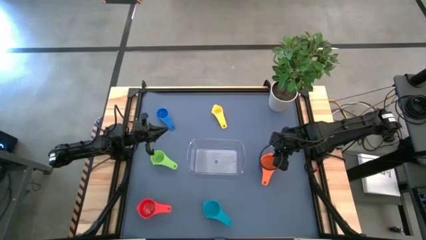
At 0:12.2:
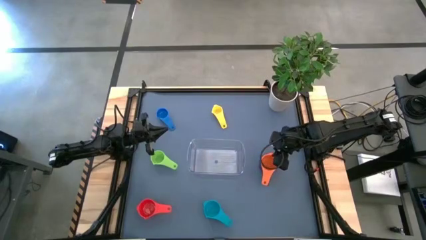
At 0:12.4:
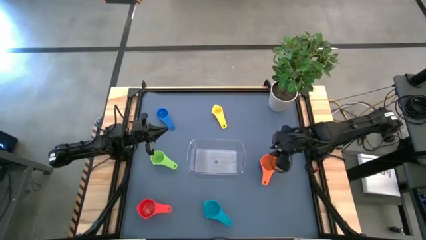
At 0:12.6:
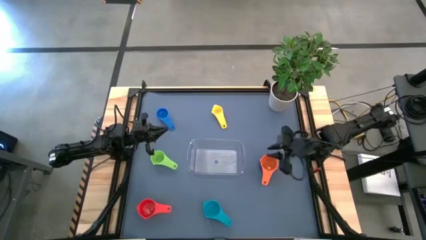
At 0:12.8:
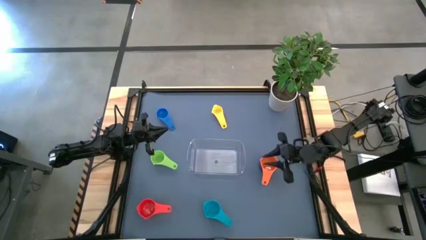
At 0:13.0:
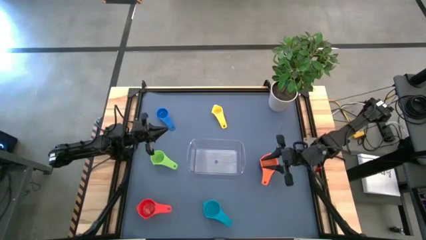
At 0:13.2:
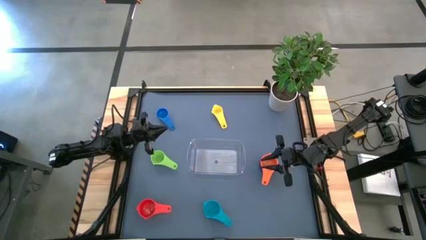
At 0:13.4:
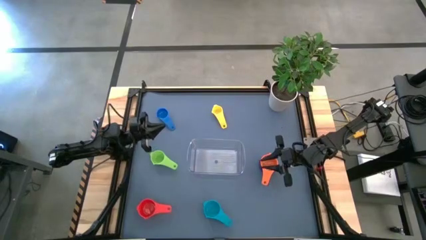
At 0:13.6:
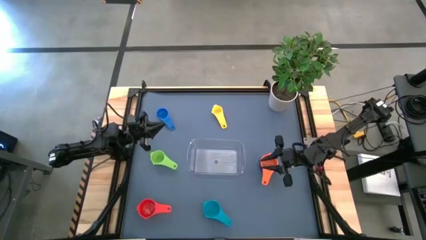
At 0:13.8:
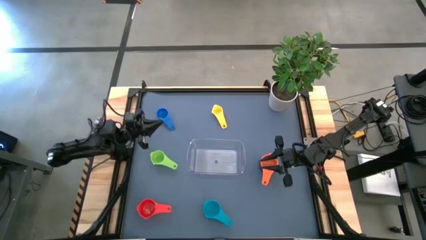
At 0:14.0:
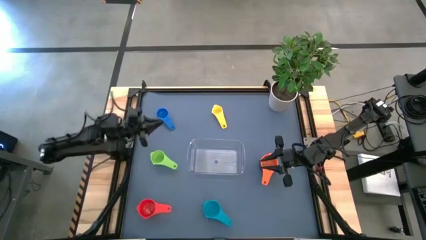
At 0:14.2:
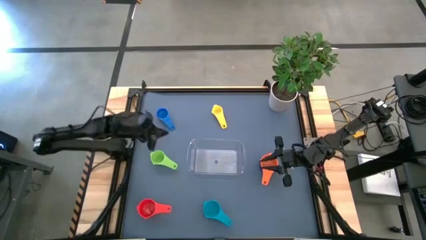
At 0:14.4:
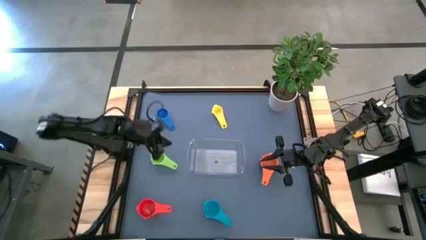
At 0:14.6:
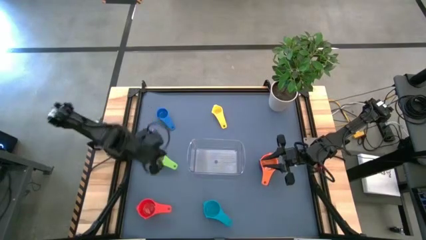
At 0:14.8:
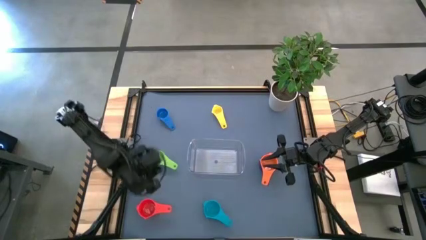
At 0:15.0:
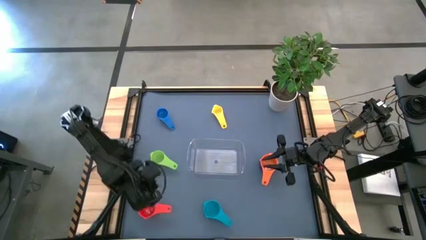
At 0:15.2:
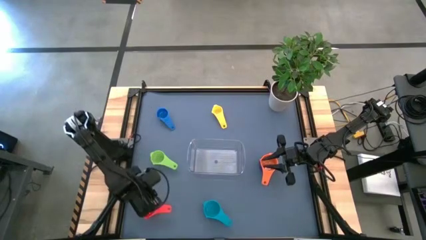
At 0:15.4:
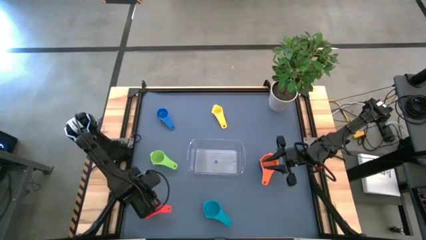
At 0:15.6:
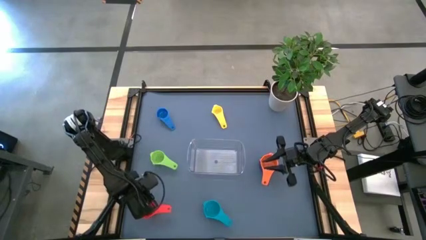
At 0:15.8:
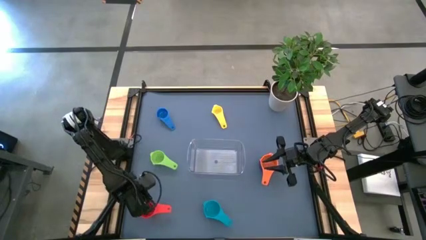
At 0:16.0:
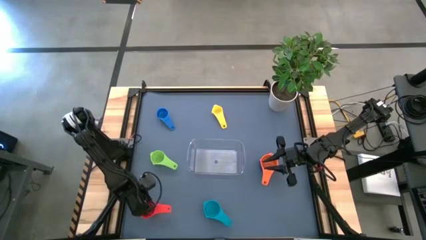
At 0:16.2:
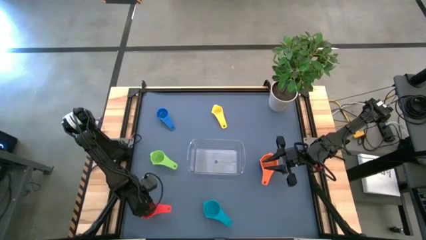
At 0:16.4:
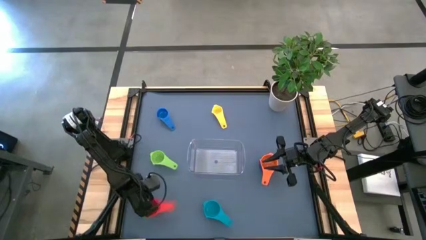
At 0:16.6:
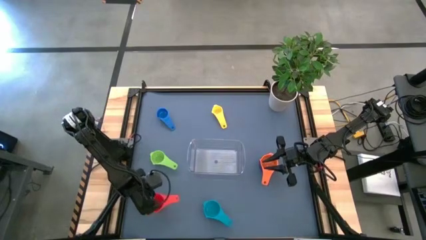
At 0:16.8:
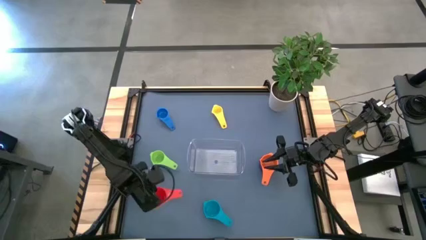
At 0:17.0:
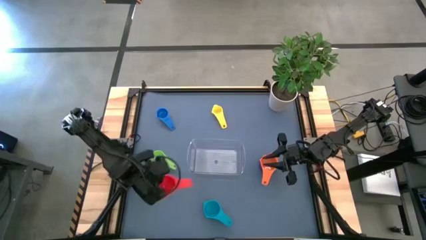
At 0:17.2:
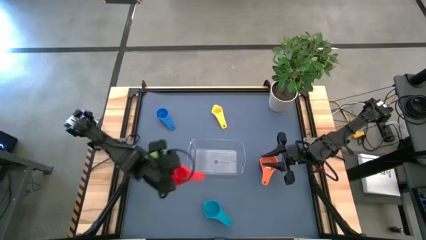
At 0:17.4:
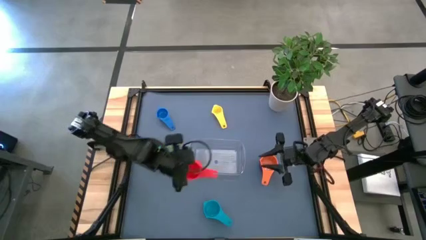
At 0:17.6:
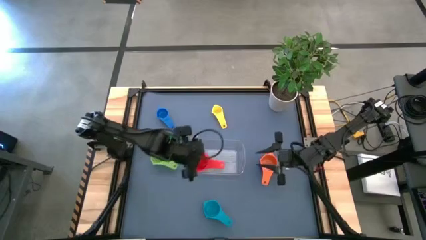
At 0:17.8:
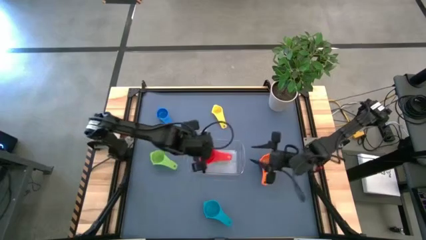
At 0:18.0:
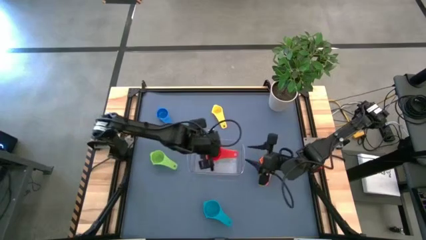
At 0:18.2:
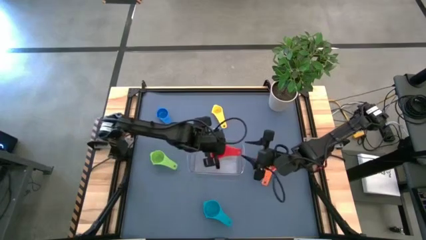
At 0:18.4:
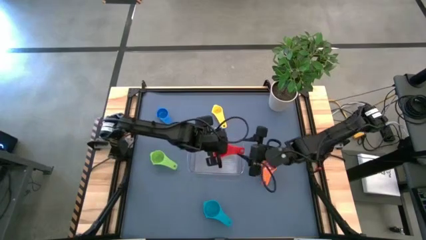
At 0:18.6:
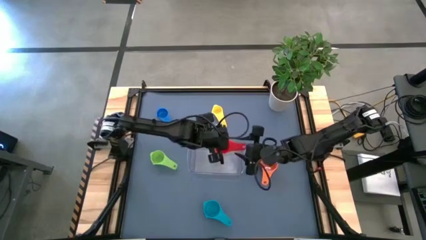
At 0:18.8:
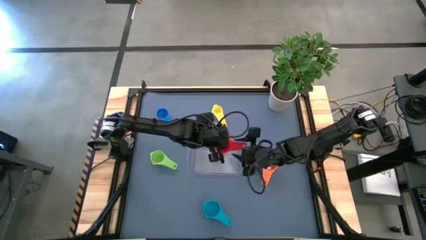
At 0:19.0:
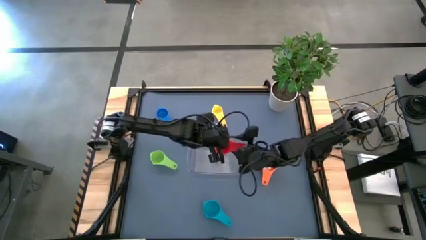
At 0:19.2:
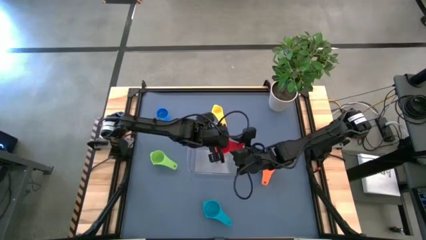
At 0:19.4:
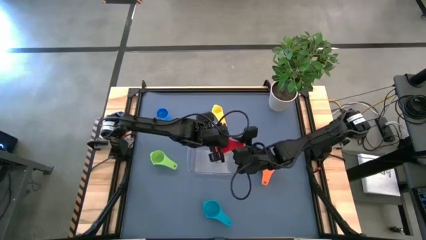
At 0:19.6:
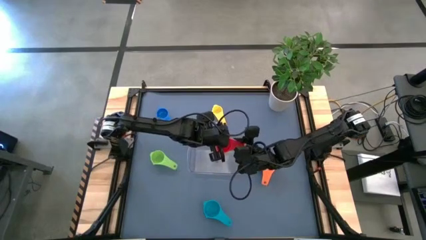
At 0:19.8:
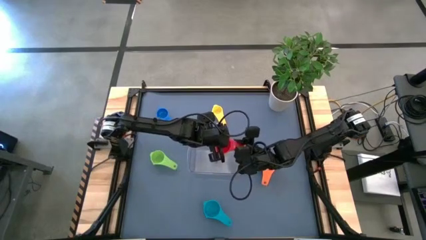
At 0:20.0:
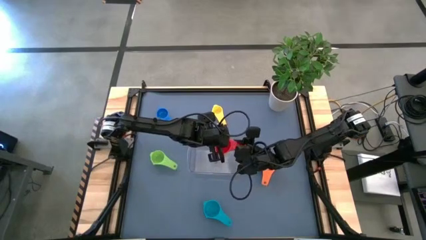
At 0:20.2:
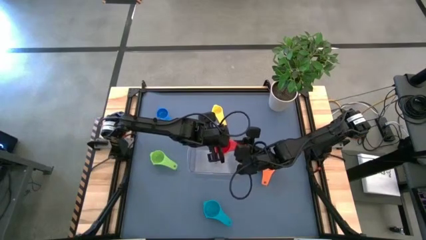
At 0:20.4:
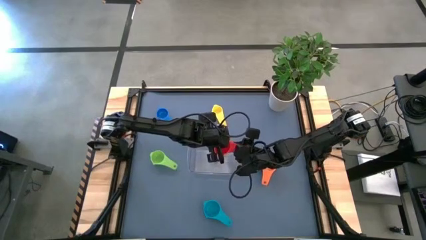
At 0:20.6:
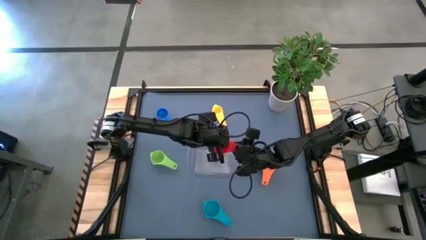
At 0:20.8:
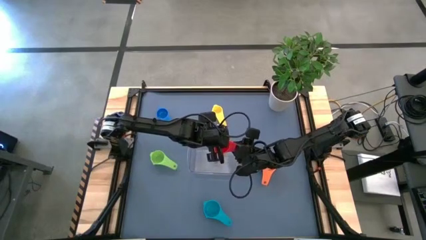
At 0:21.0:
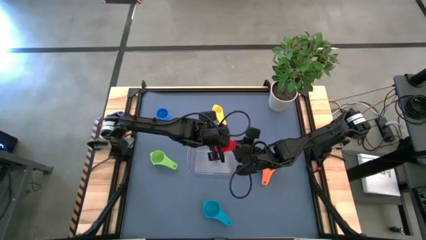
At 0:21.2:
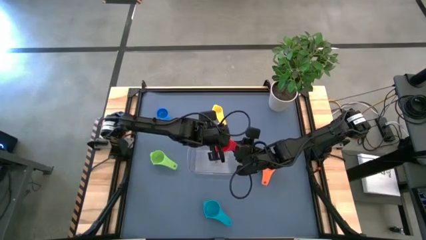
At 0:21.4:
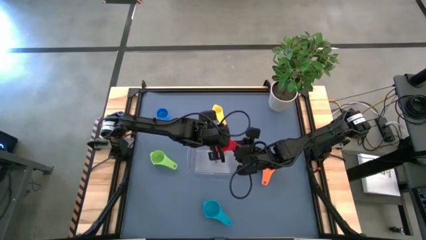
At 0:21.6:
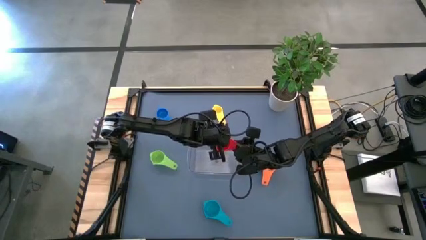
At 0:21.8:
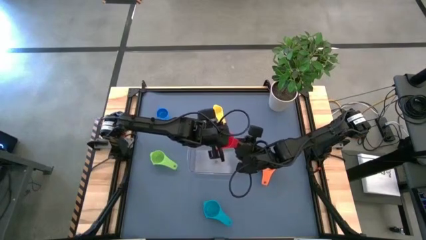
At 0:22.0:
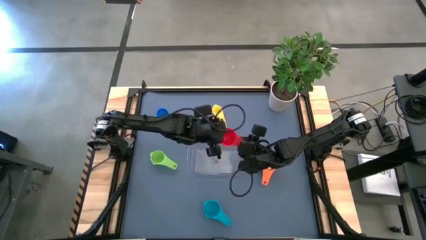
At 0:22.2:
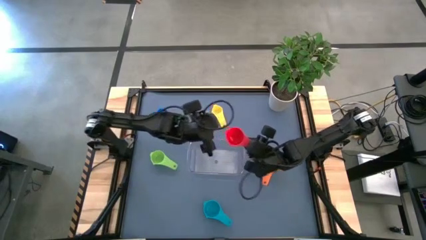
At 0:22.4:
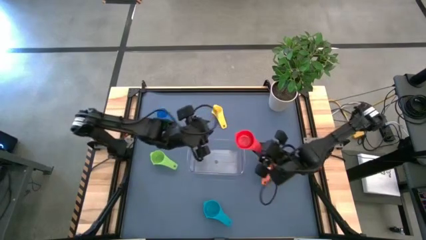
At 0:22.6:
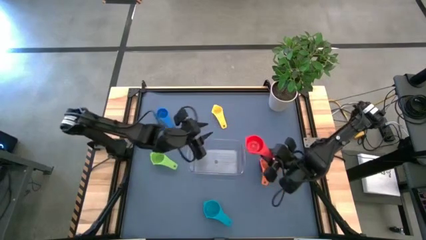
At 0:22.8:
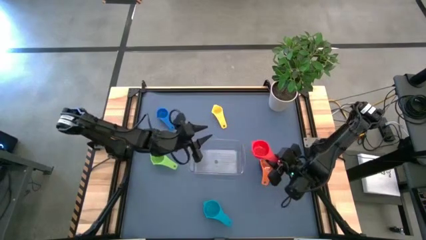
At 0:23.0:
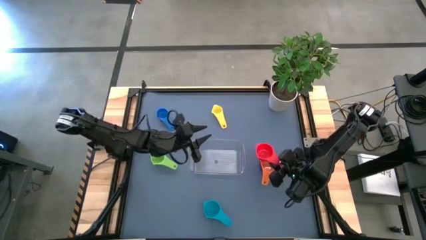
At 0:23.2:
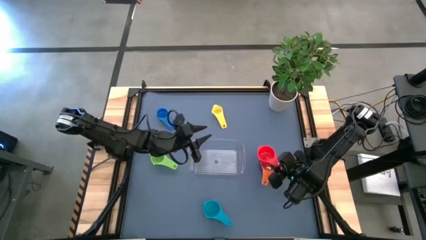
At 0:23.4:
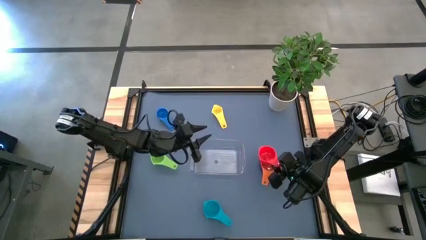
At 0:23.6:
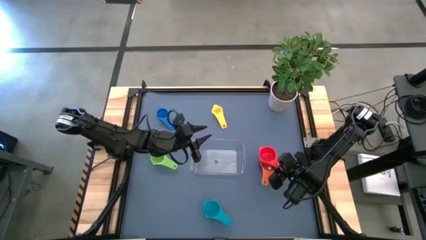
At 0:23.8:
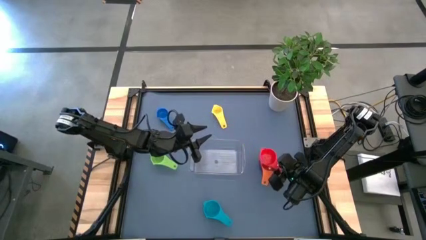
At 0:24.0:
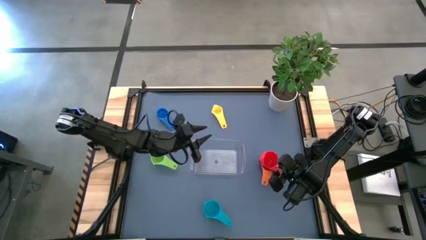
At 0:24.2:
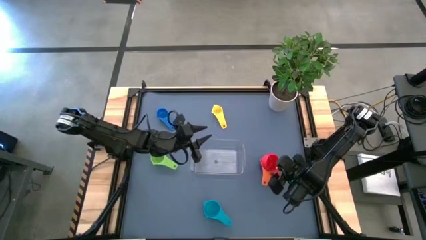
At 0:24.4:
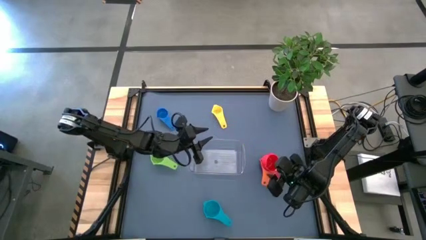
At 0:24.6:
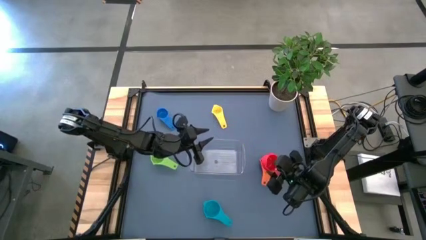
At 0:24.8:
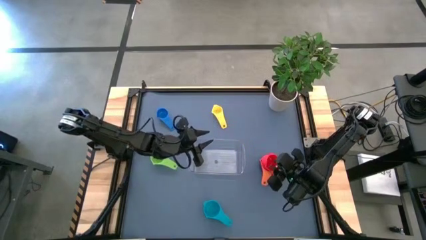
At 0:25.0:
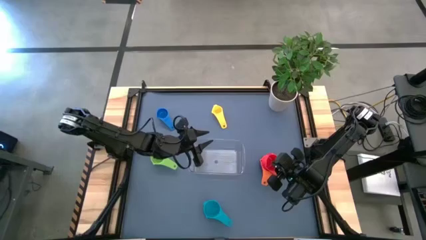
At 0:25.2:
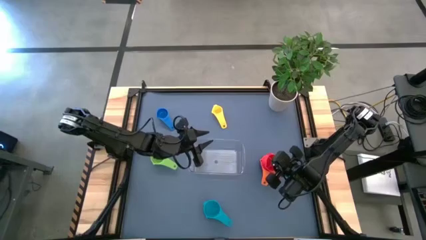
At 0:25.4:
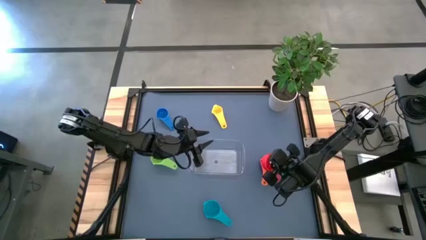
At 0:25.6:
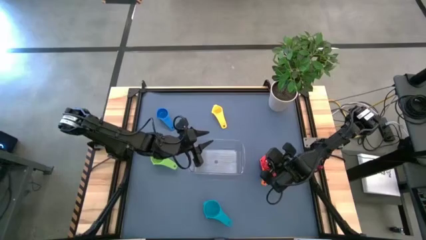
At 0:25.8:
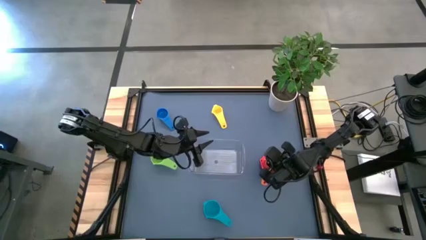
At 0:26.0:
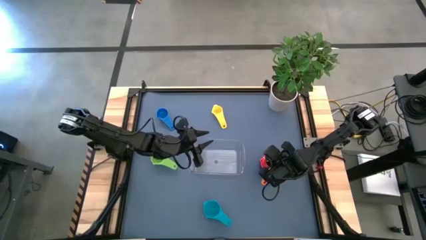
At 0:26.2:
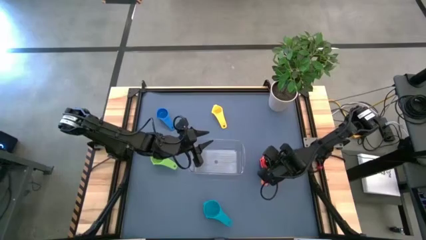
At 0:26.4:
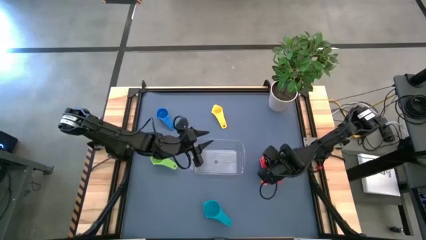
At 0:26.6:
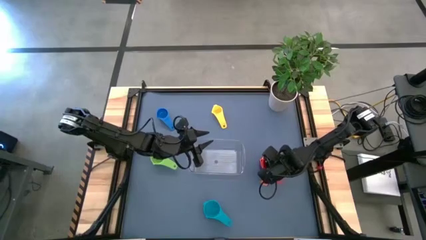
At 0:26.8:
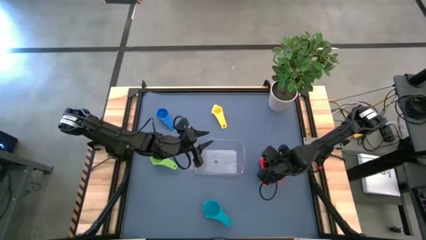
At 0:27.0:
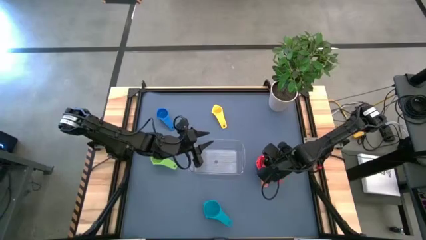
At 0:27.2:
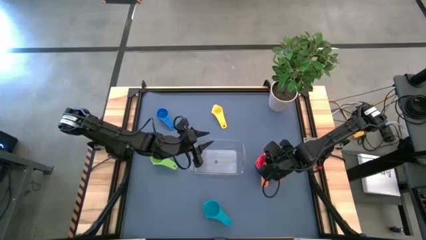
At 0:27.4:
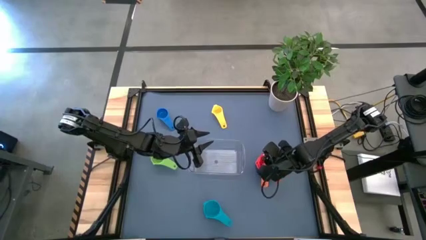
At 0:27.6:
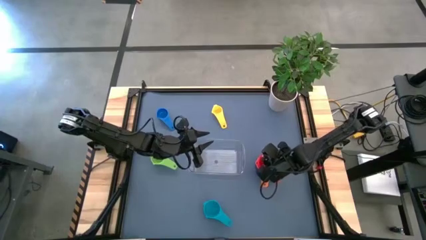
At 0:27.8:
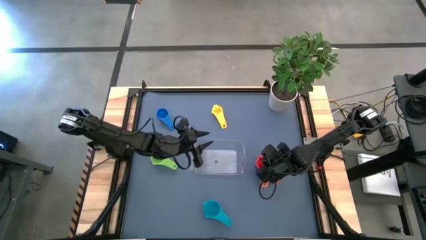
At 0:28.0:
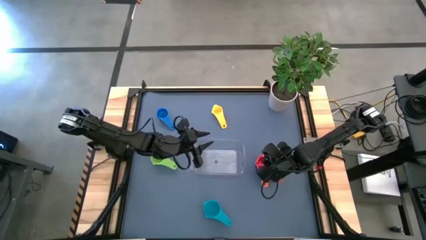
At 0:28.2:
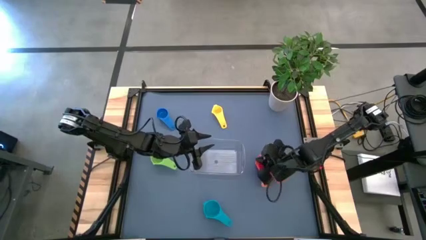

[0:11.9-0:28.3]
Task: Nest measuring cups in basket
Stack the red measuring cup on top of the orange measuring cup
